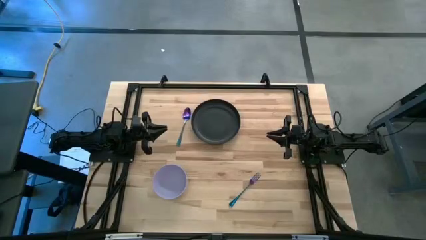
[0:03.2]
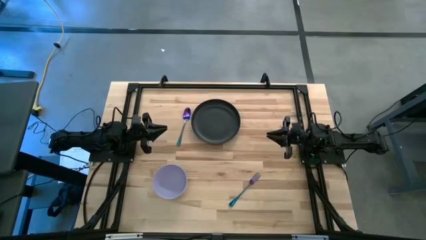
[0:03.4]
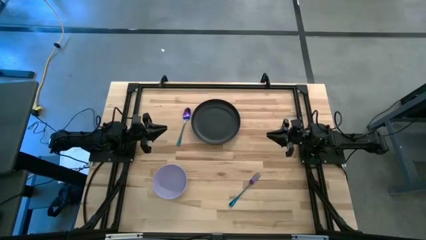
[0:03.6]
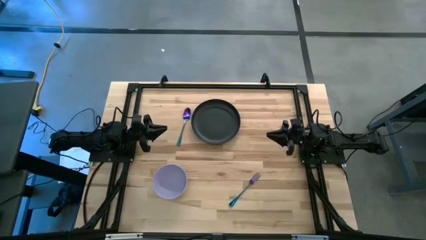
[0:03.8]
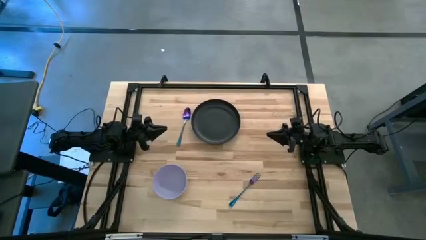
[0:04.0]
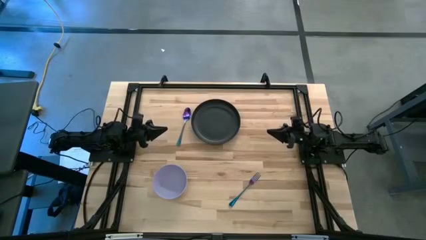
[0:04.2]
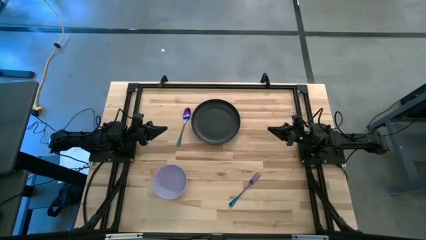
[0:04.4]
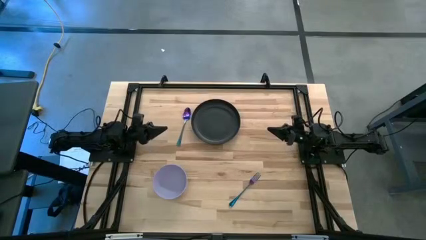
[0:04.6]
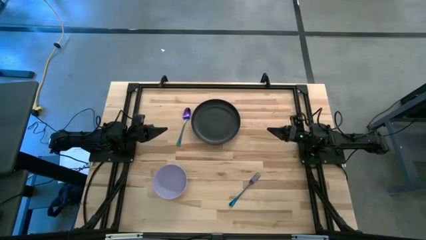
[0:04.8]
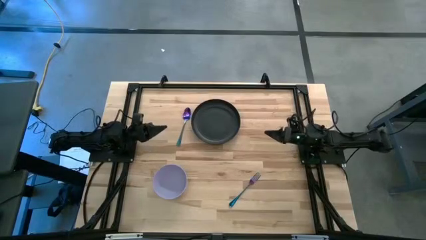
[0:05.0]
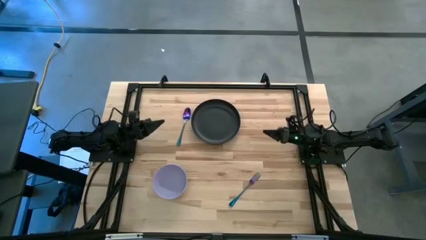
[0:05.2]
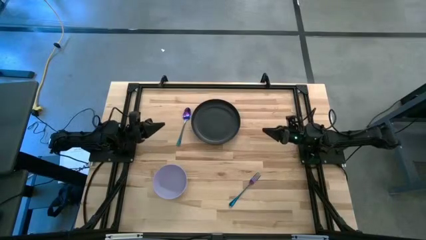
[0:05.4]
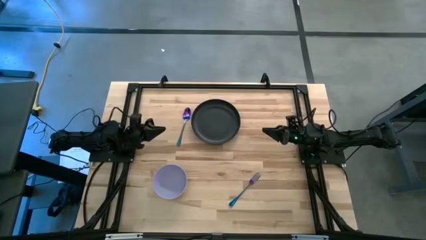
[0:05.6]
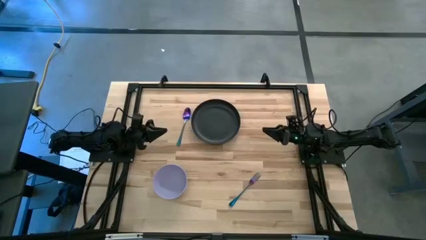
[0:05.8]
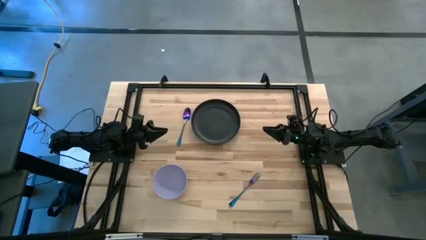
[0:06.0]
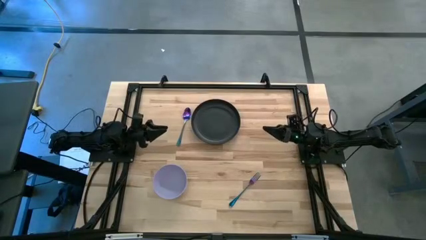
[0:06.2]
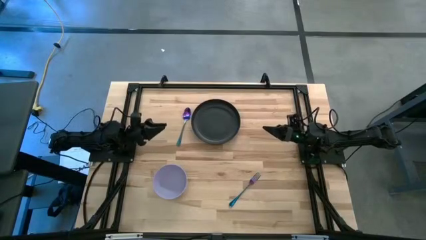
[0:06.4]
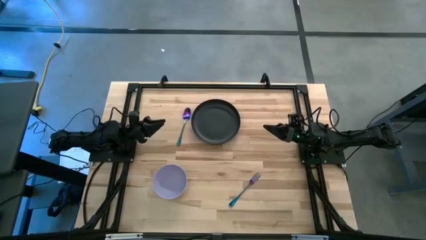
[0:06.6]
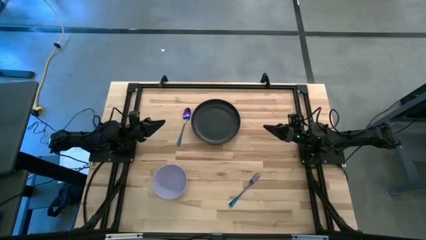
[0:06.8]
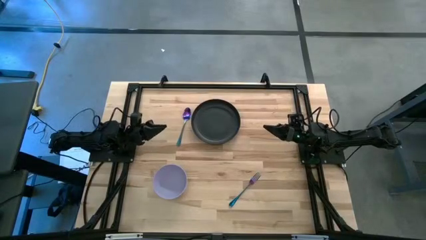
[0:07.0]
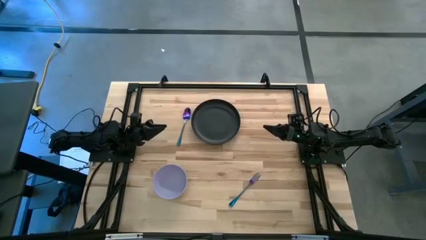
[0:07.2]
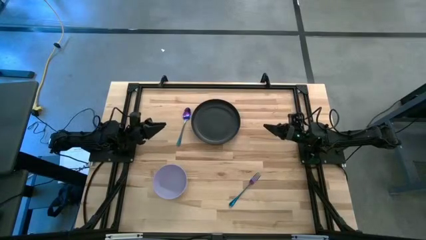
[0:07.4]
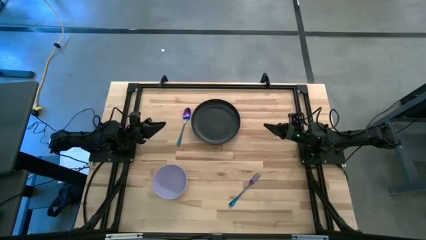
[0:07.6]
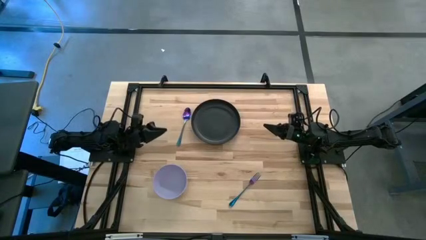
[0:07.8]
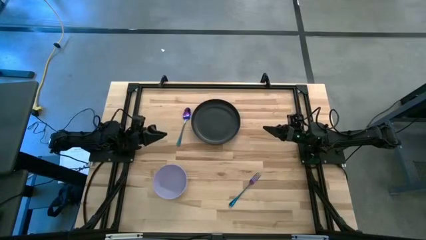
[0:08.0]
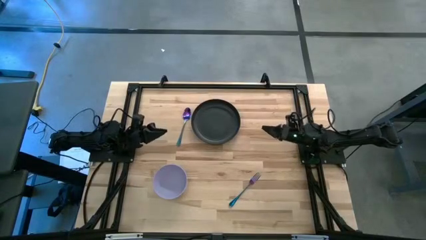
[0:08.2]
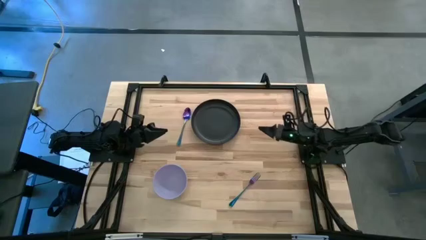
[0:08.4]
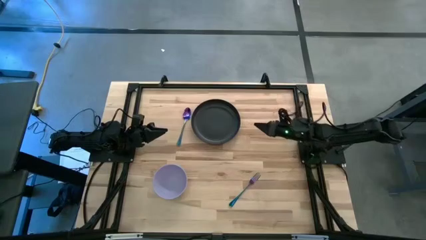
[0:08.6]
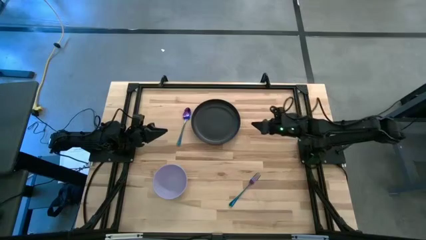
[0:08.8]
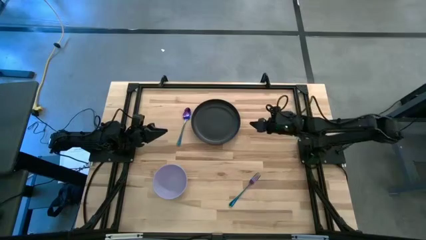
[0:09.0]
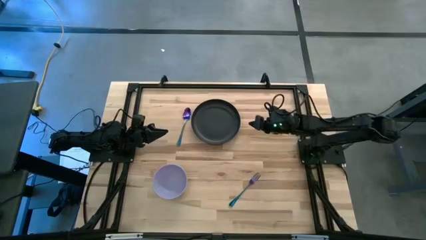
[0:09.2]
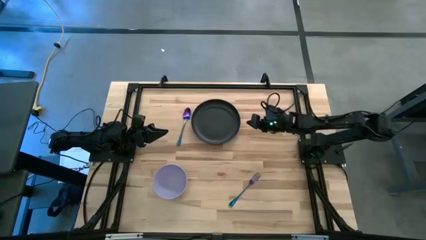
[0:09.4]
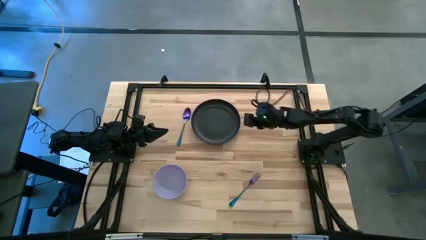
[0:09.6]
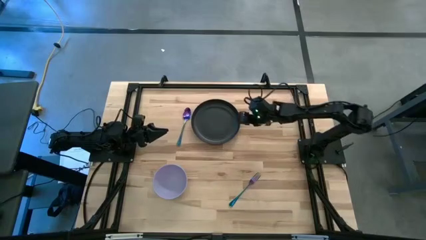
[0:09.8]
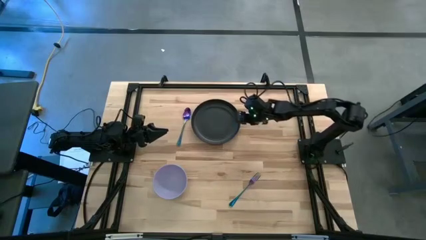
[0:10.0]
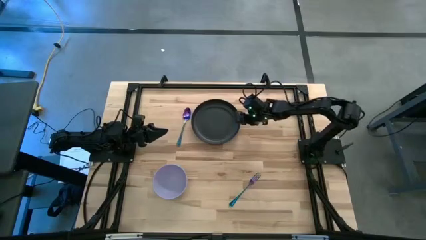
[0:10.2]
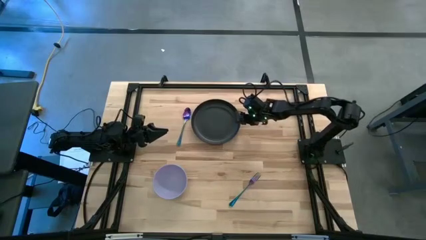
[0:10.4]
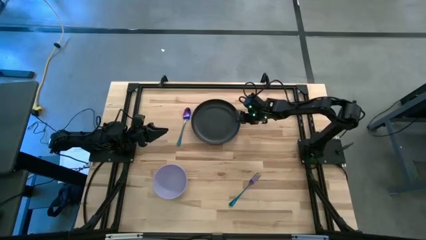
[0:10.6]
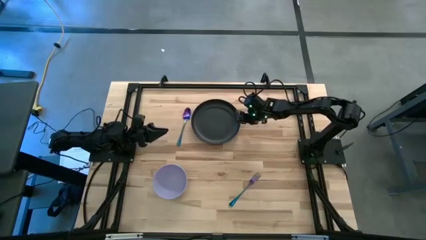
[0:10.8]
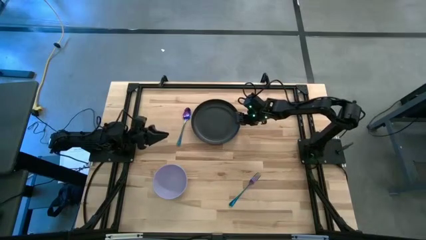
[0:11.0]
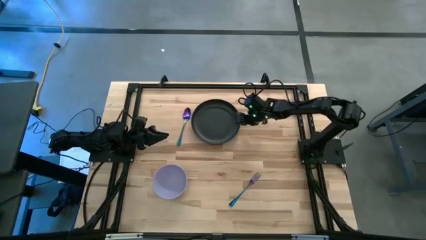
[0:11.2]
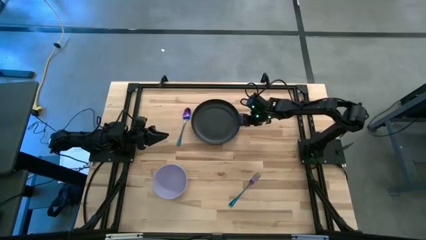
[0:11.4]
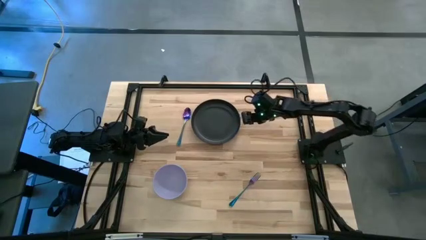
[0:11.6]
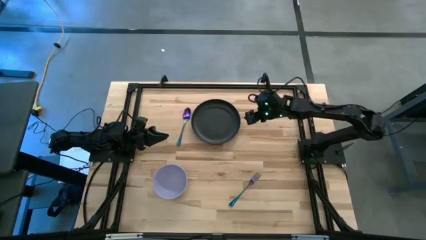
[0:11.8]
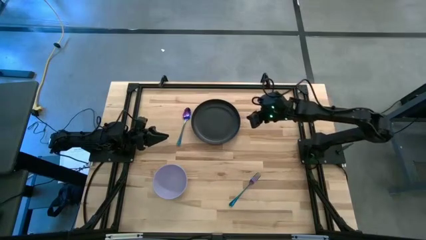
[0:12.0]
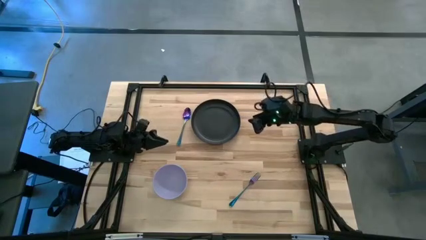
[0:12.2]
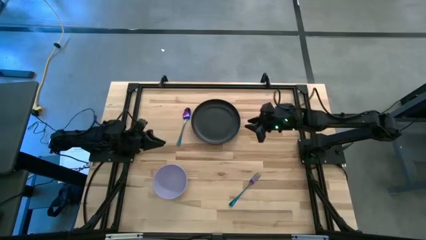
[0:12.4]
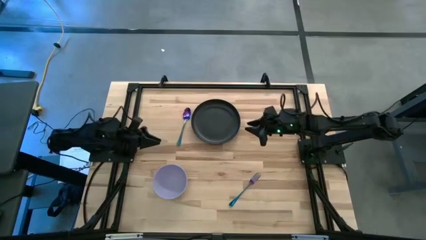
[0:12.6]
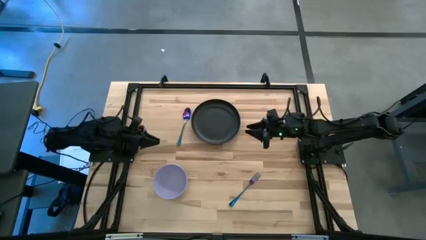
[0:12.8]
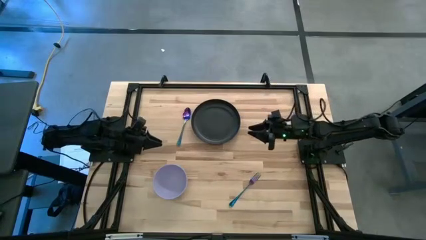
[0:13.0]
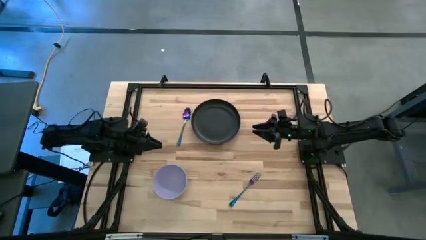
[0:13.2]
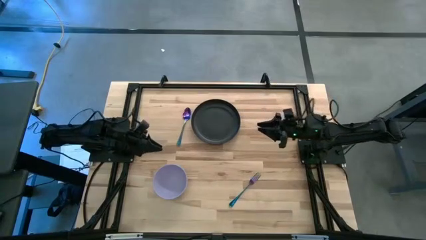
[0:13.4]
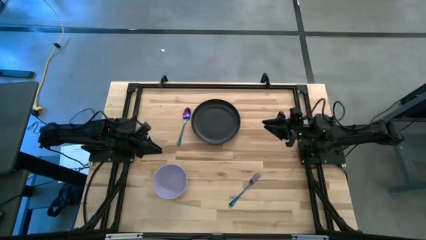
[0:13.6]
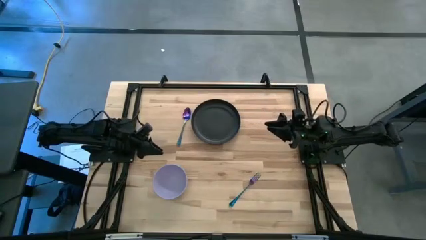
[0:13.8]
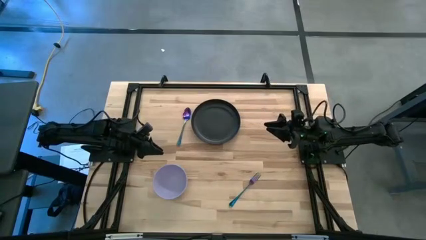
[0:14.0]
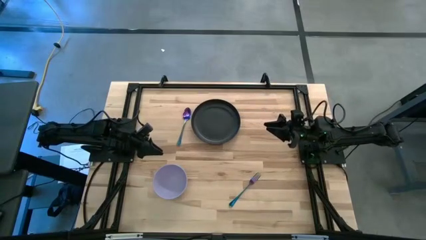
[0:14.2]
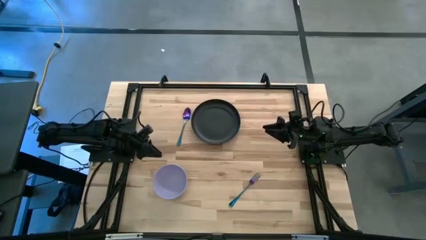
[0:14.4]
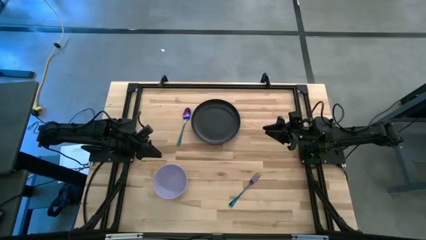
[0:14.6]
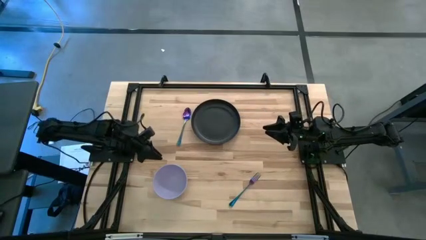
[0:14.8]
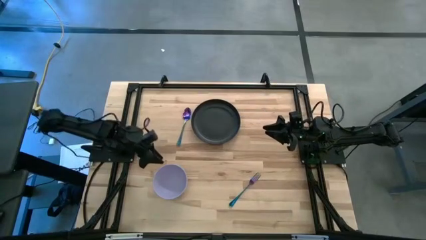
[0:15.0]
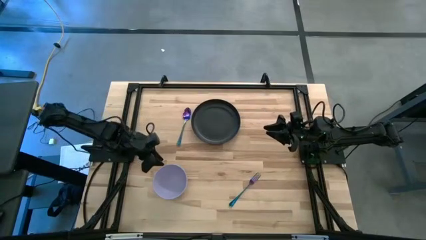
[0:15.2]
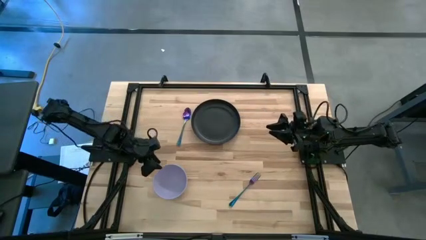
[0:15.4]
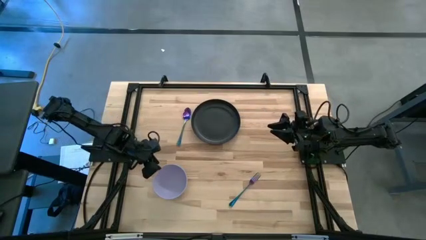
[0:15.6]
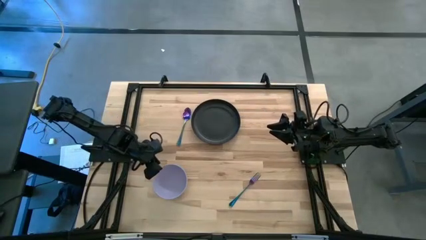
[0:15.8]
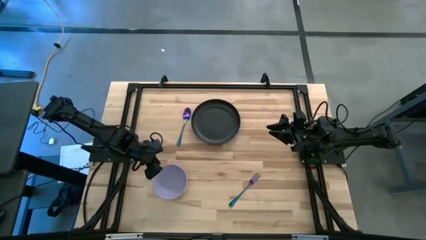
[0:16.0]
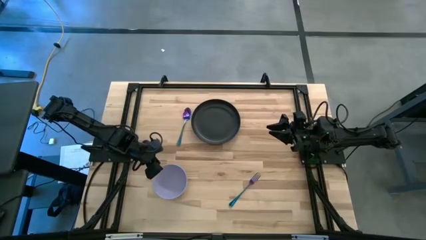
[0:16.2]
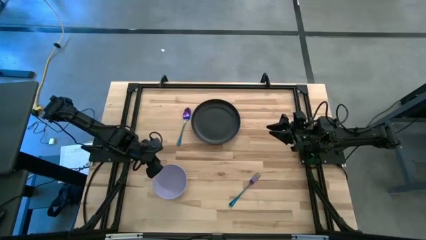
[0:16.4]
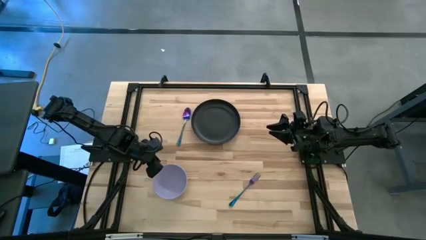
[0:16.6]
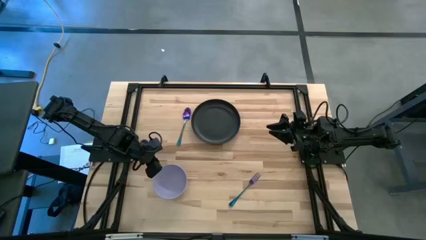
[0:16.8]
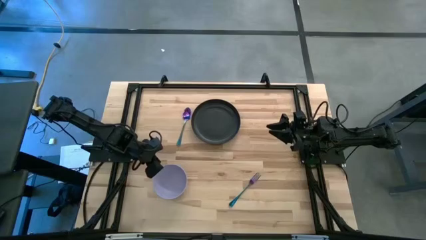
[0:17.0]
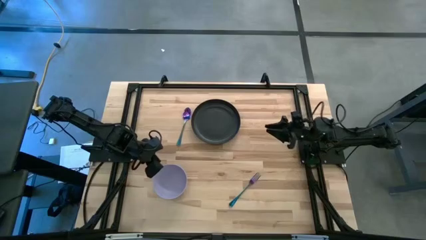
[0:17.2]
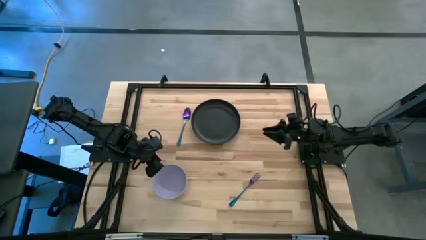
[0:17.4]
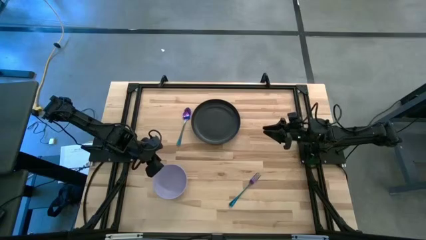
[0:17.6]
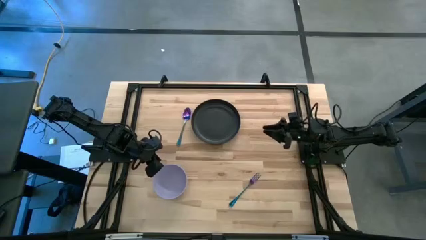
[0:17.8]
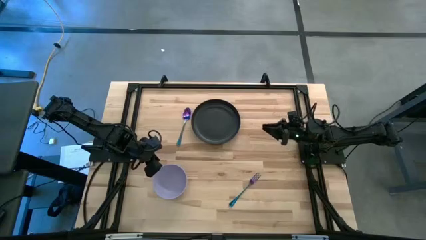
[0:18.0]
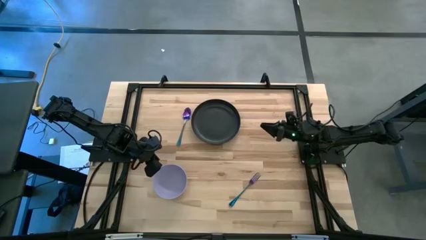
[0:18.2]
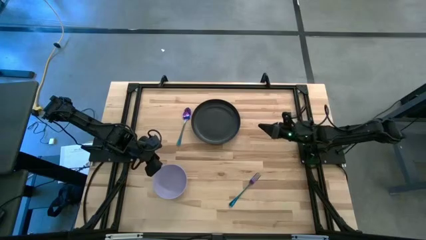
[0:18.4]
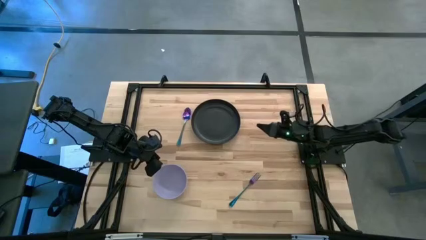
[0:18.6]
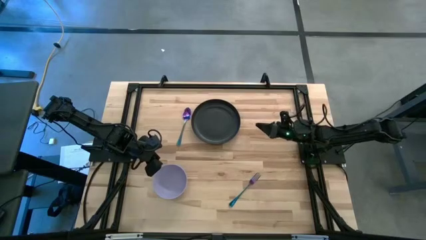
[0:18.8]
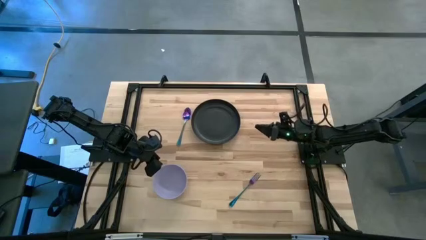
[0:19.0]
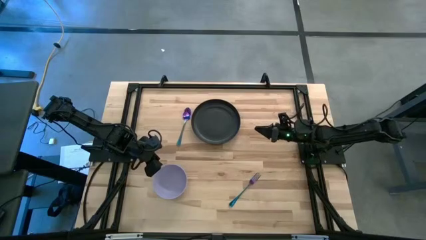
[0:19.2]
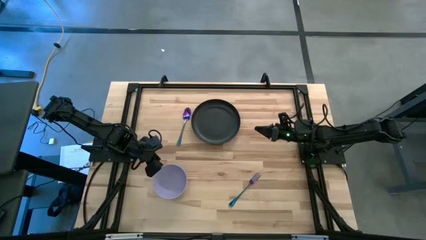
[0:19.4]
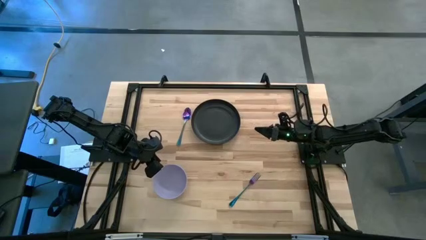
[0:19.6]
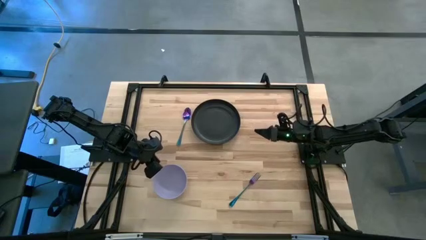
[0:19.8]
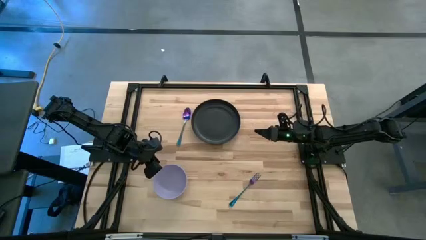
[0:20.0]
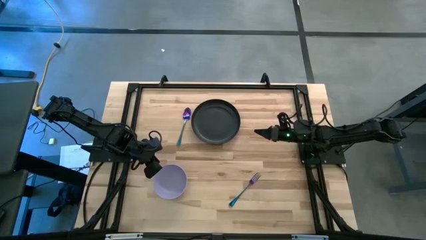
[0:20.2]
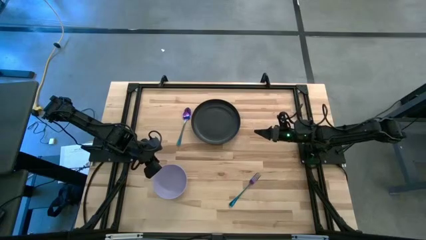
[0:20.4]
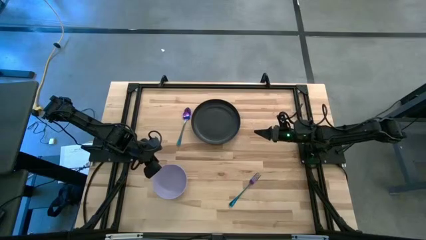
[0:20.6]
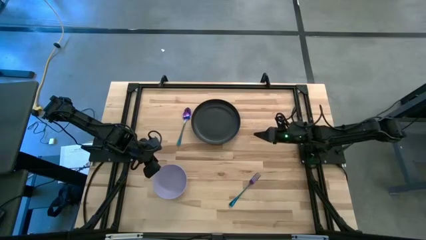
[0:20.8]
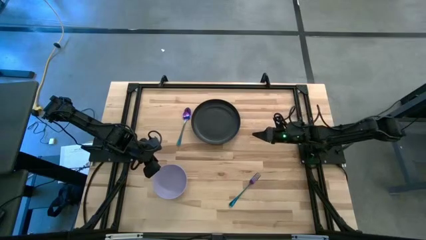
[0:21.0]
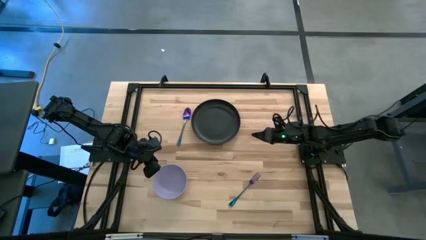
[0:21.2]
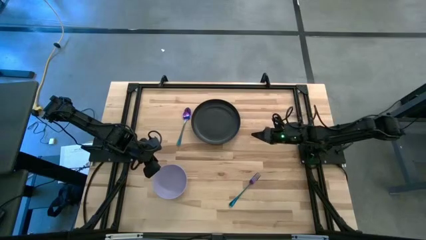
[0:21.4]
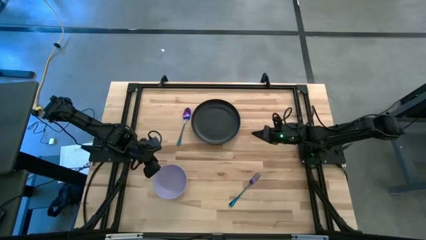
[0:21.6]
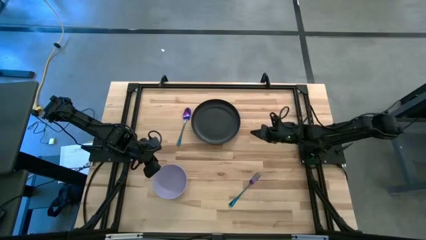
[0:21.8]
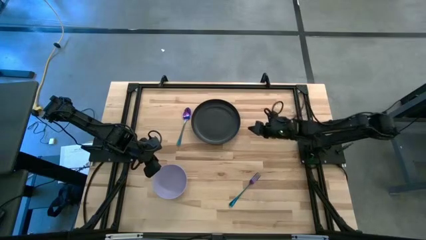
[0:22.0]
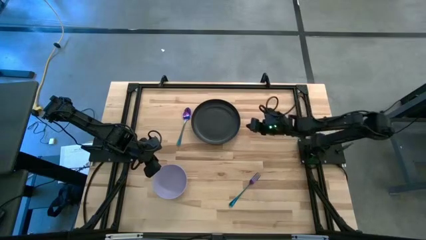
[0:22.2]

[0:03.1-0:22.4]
Task: Set table place
Move the black plate to the center
